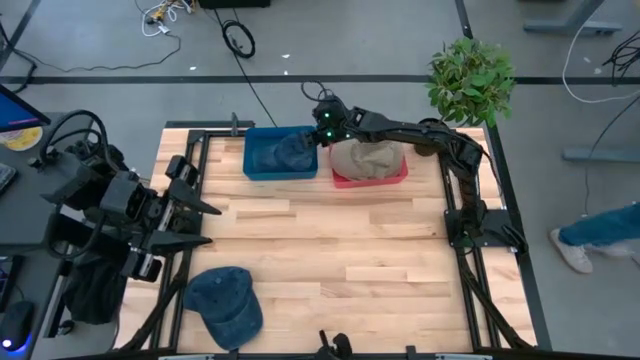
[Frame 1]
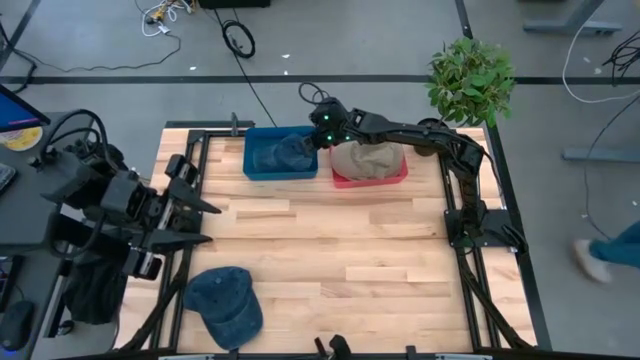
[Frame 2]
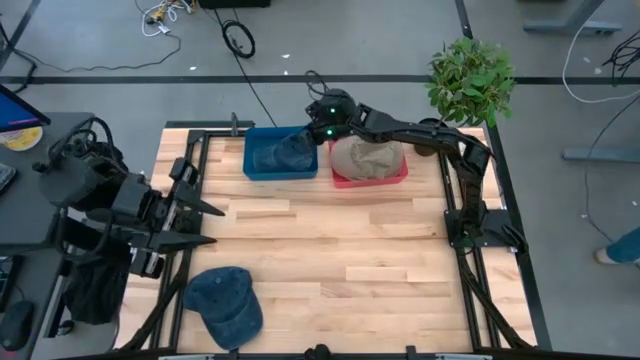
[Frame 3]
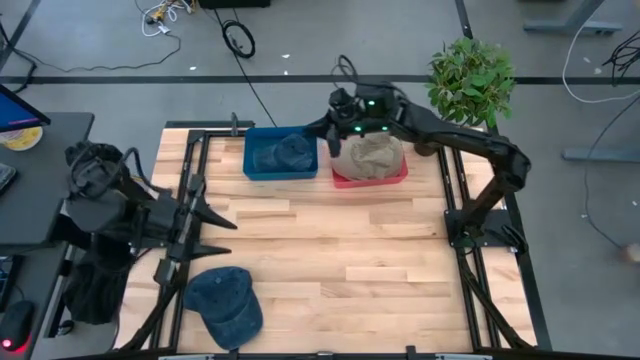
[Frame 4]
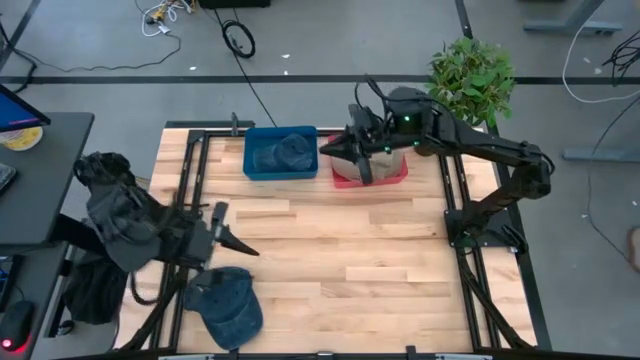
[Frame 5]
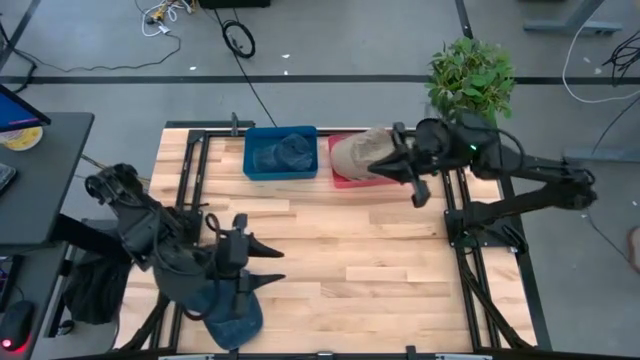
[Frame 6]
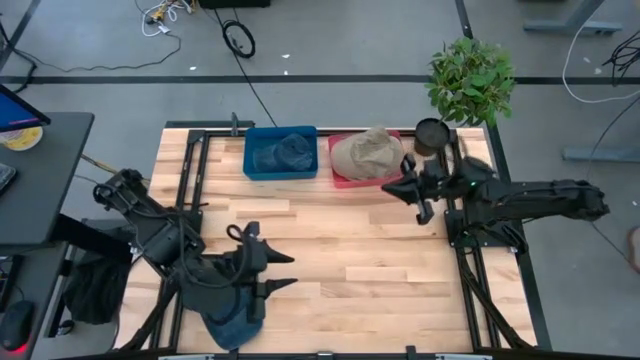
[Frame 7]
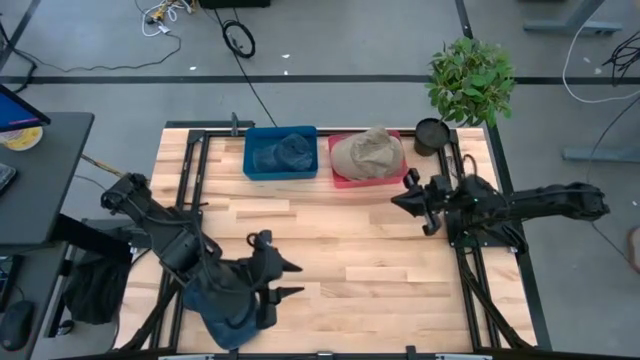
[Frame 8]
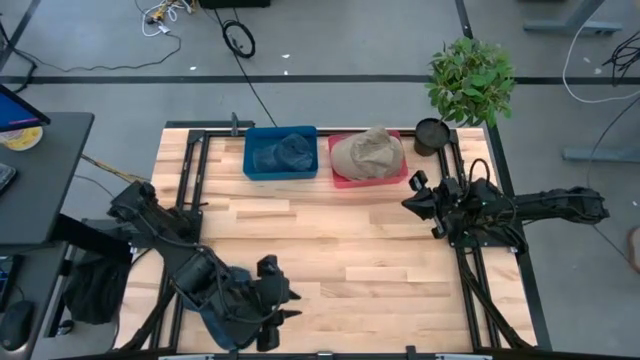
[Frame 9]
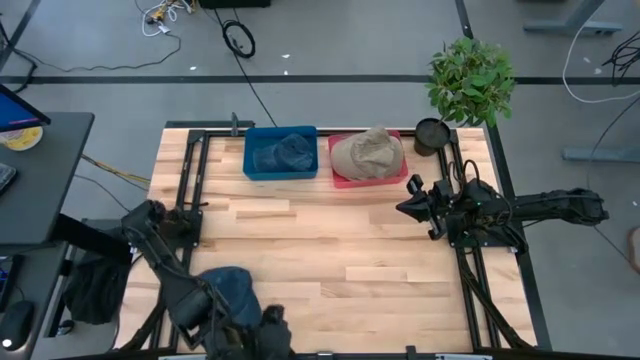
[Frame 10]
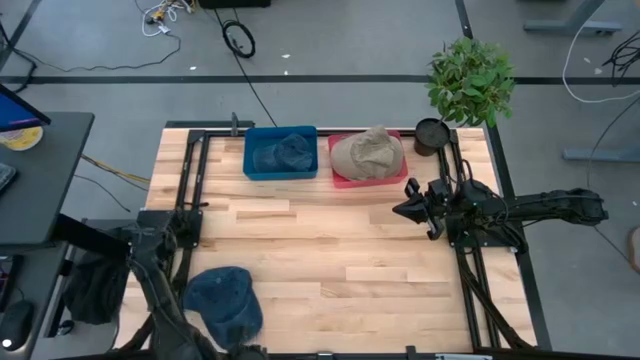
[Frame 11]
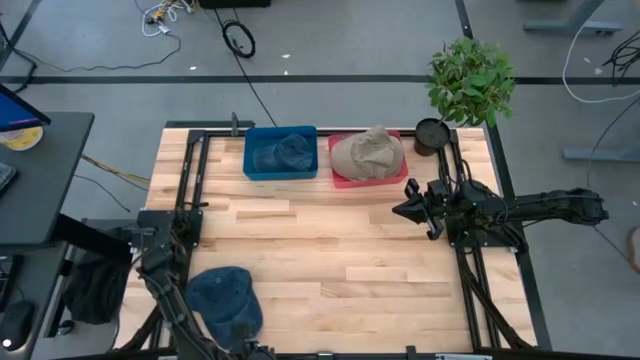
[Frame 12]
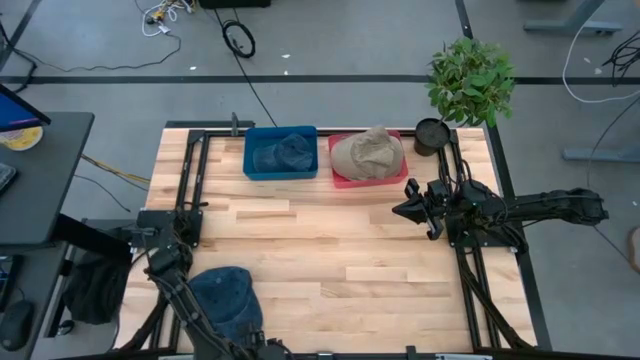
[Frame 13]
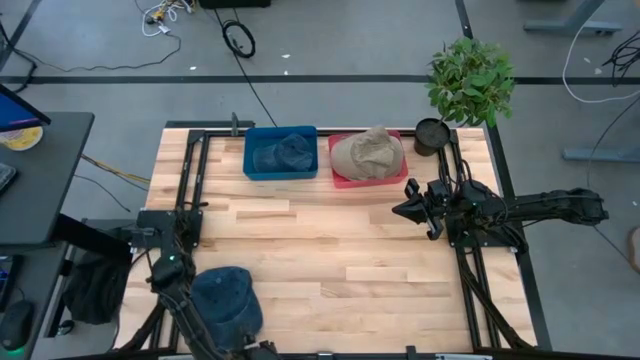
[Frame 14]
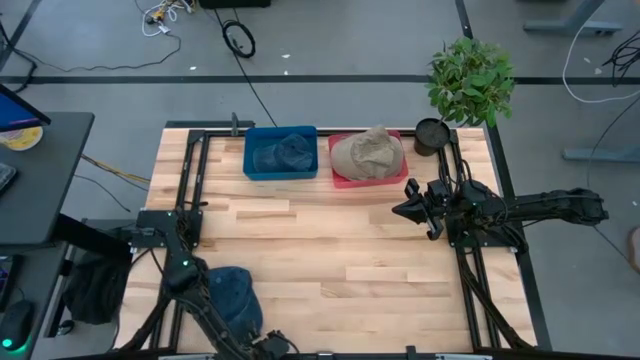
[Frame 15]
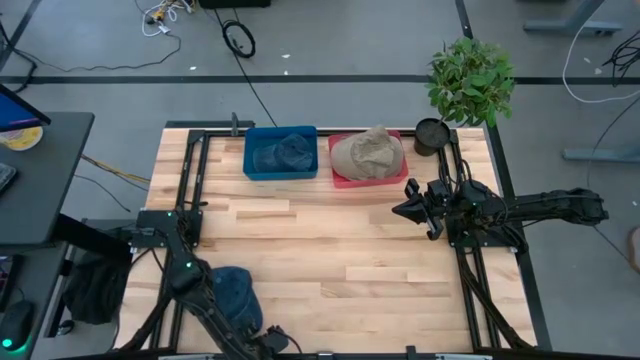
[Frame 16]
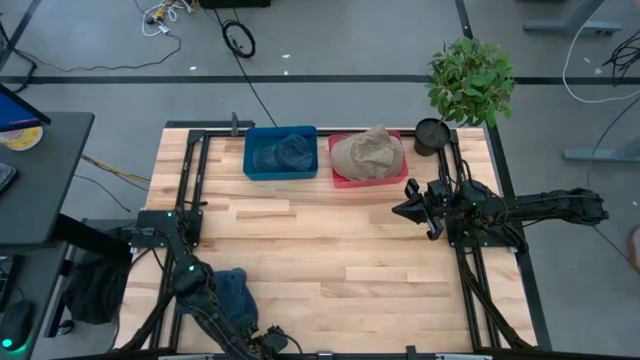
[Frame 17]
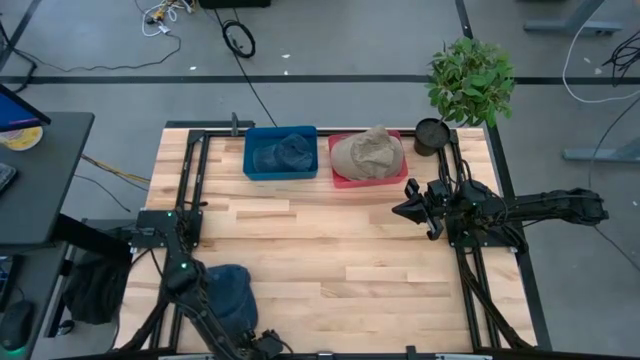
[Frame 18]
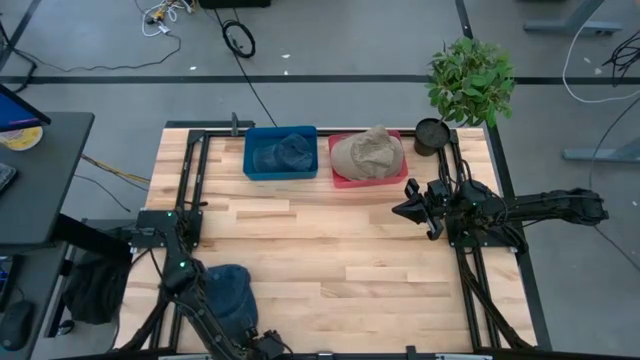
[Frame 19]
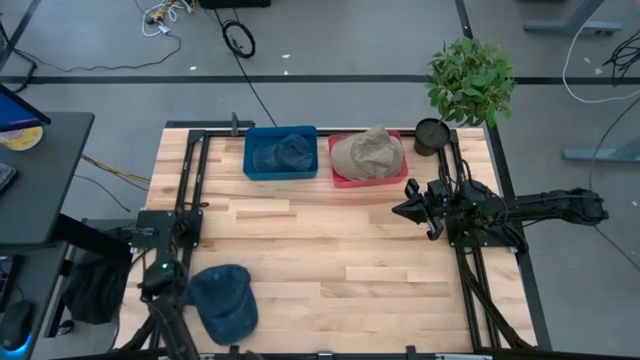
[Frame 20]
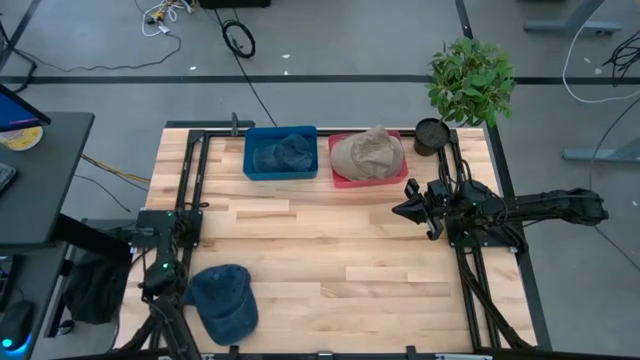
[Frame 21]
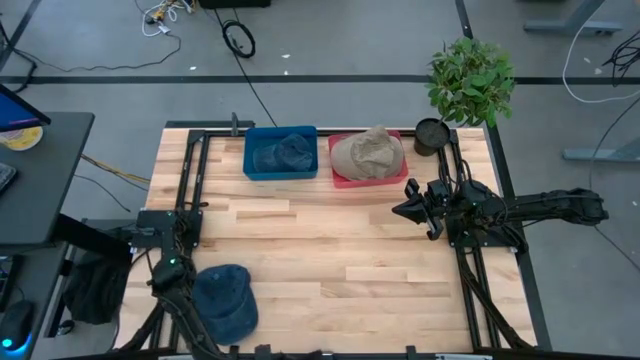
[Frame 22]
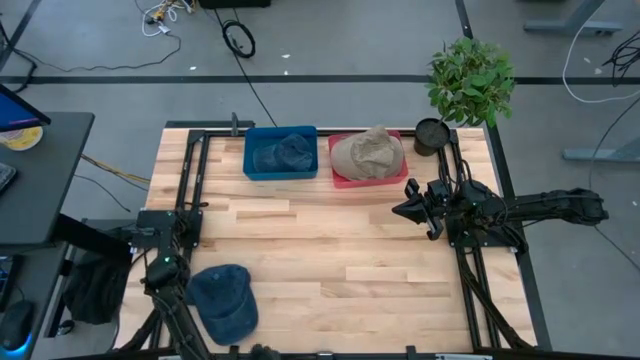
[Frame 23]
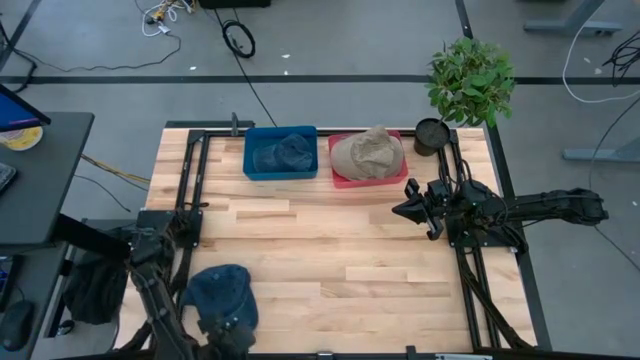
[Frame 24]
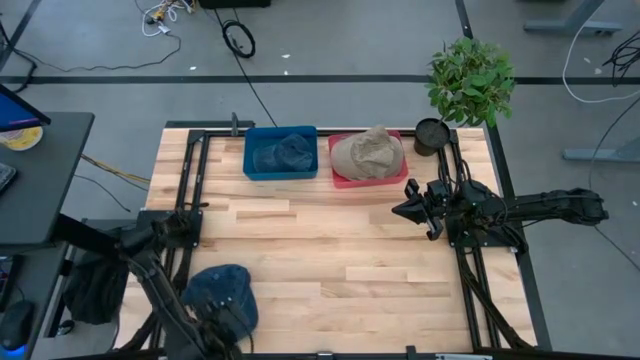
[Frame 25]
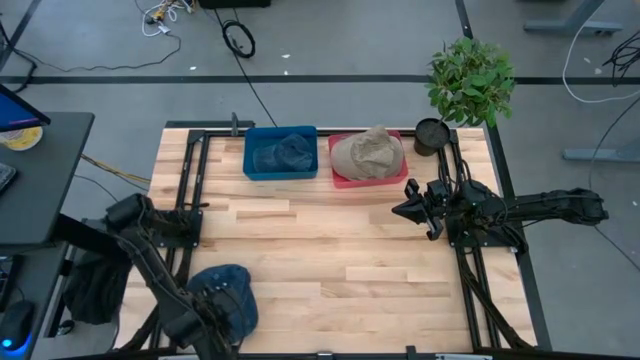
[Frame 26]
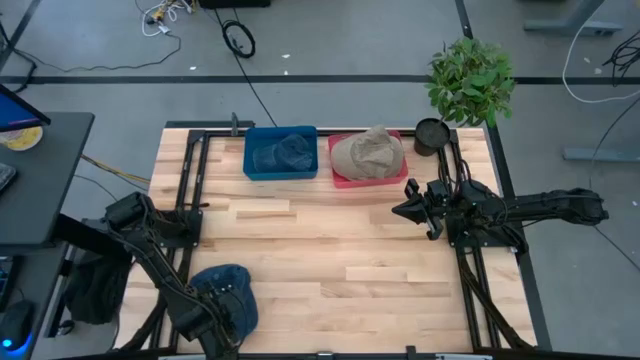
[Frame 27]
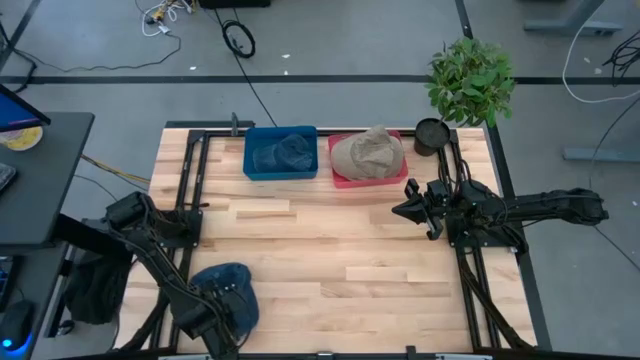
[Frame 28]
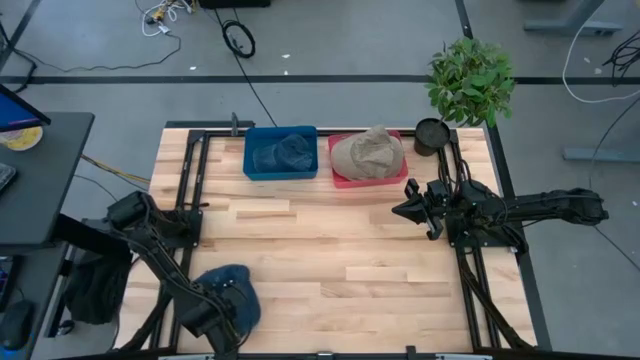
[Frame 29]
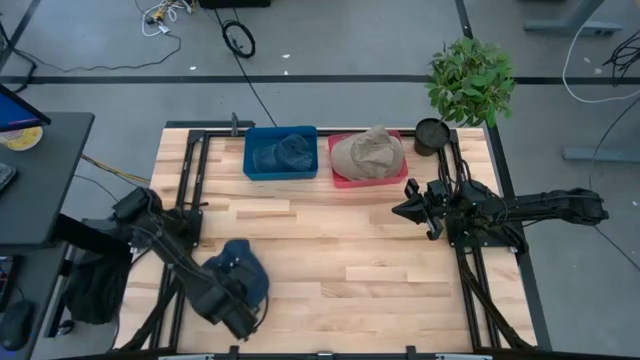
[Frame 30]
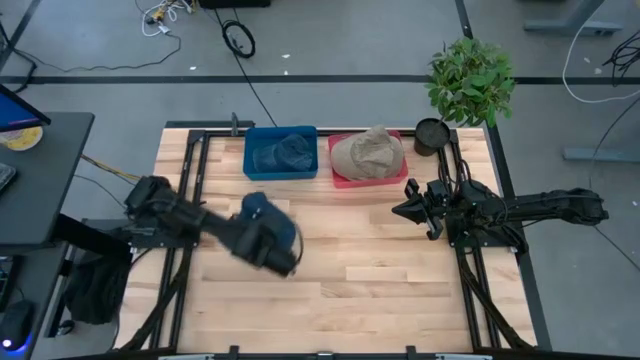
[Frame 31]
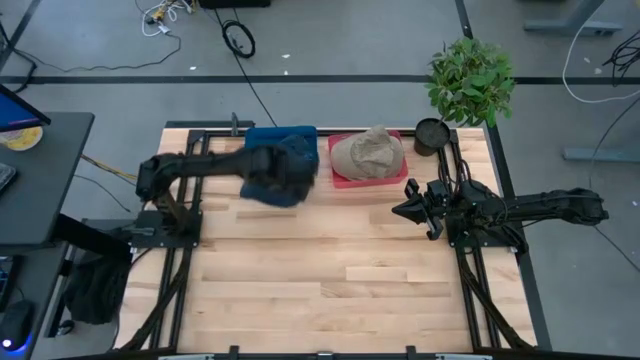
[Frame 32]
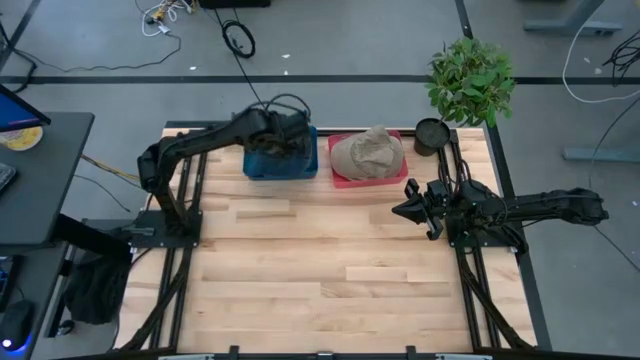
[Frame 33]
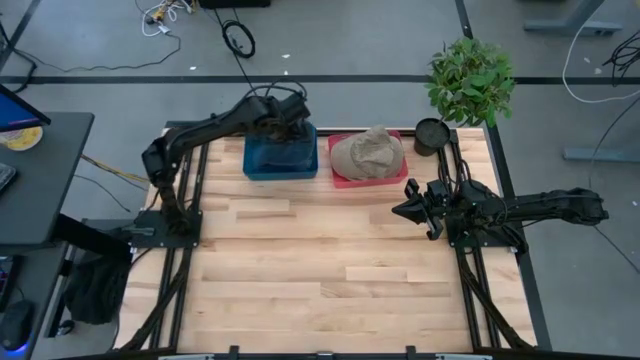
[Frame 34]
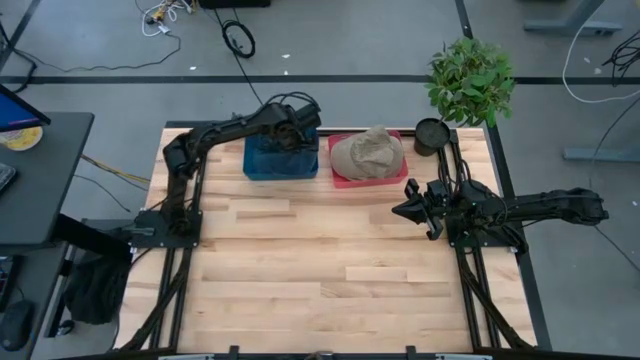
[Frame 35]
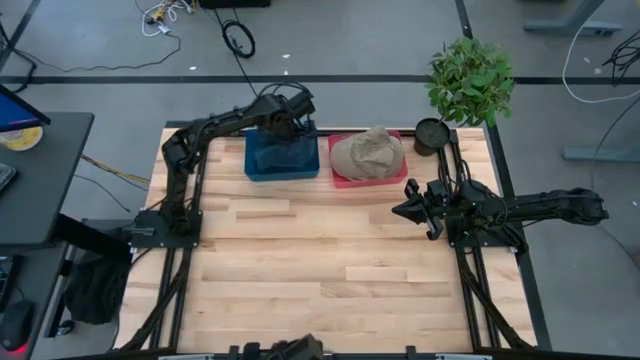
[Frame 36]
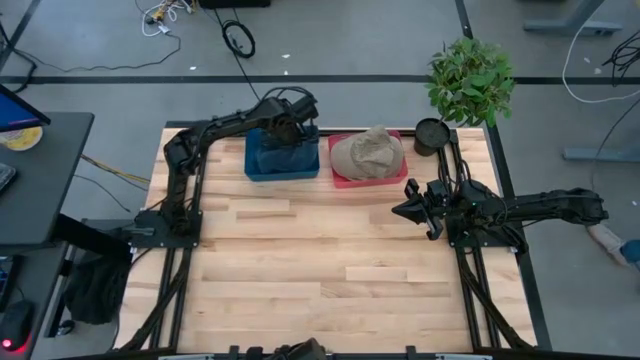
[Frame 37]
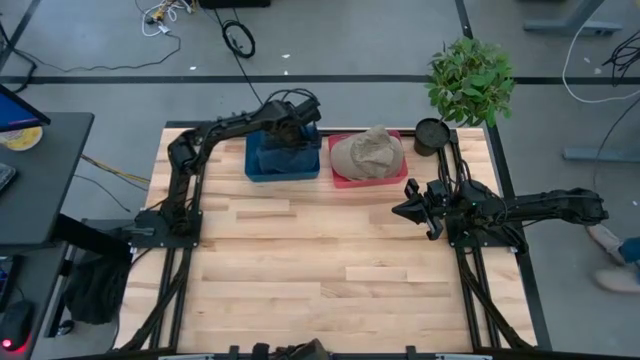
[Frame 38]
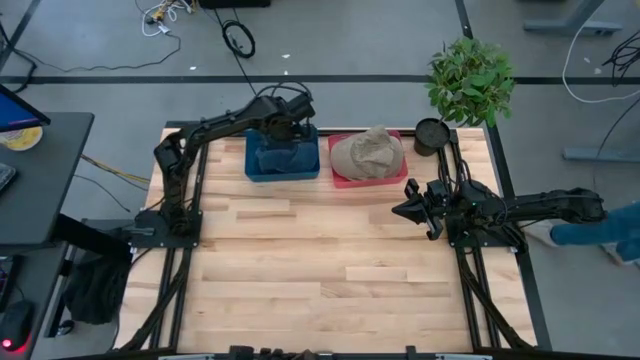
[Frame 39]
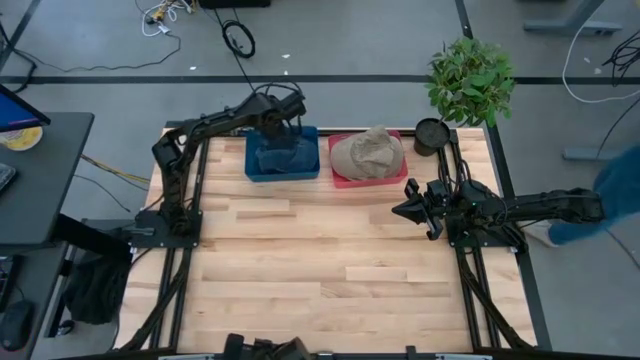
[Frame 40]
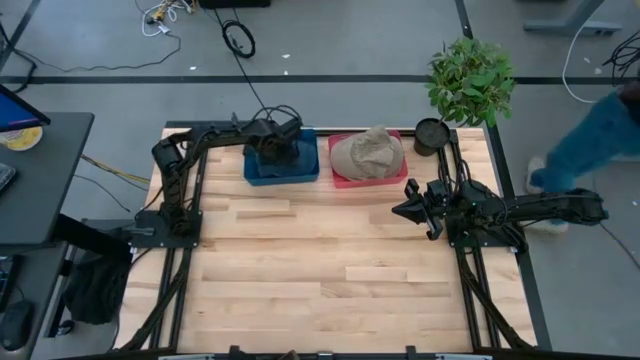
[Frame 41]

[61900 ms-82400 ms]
Task: Pick & Place hat
Put the blue cap into the blue bin
